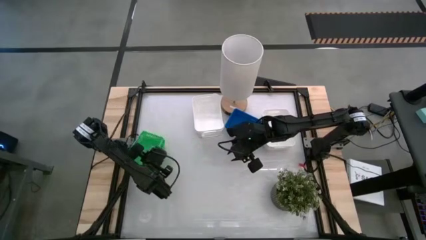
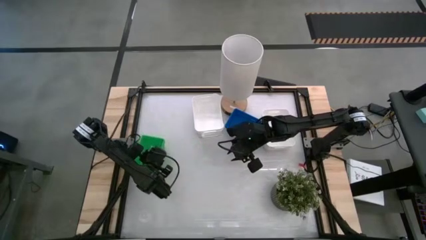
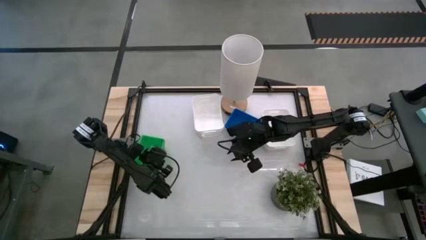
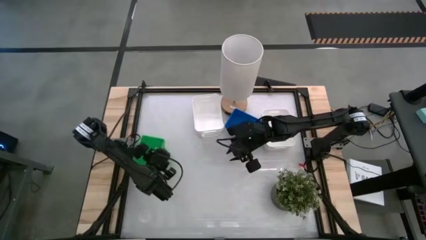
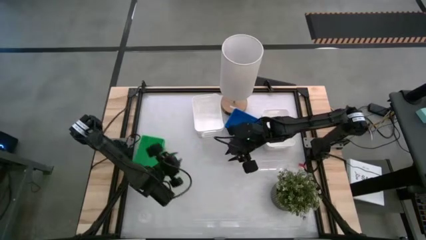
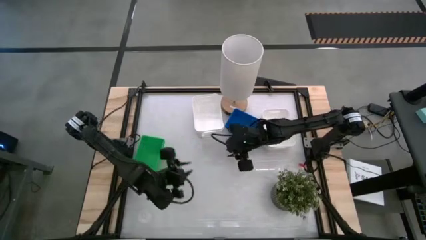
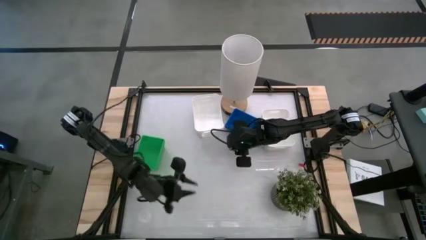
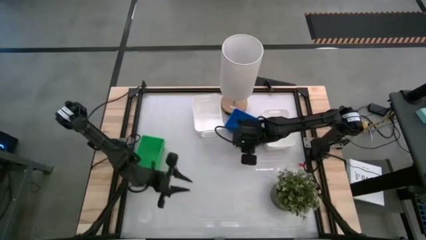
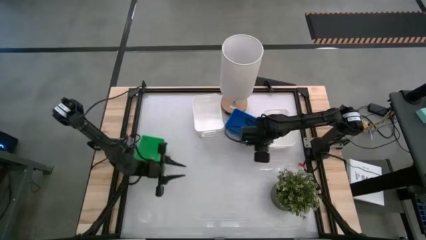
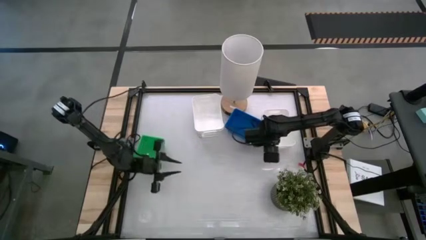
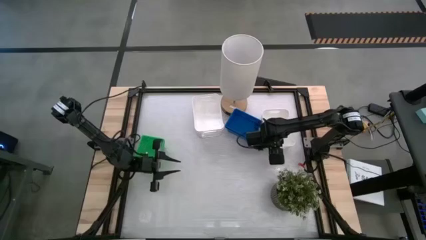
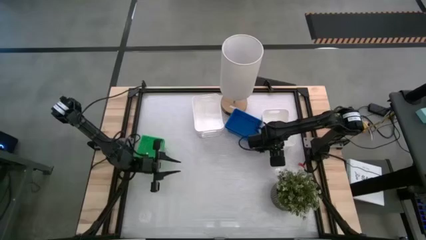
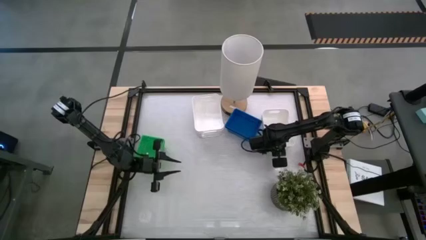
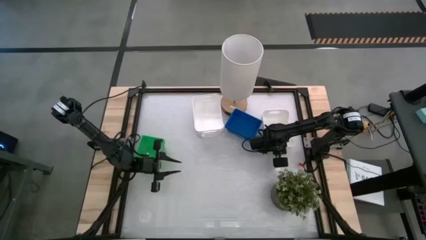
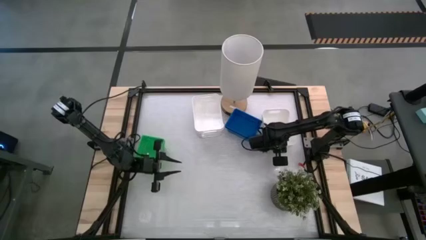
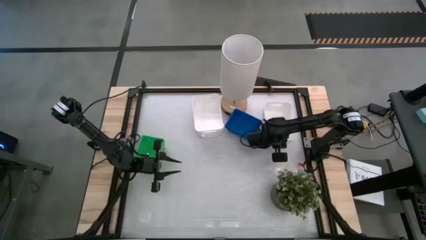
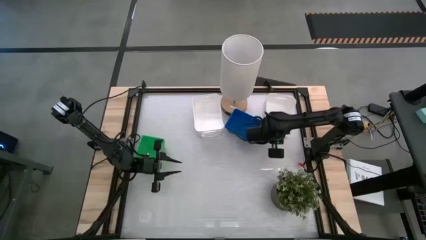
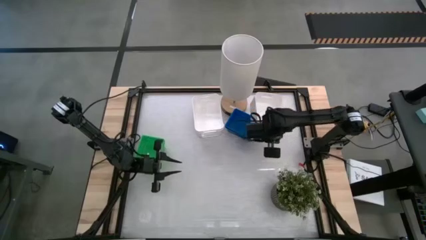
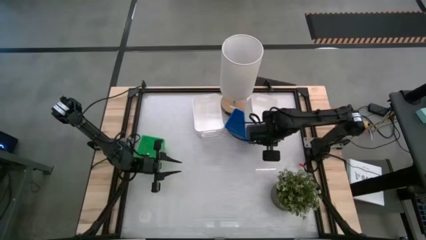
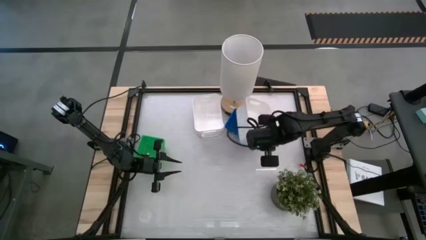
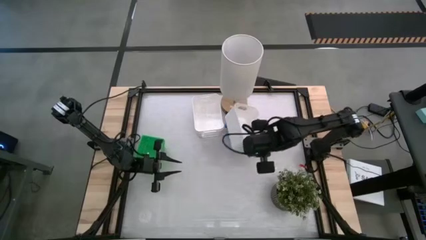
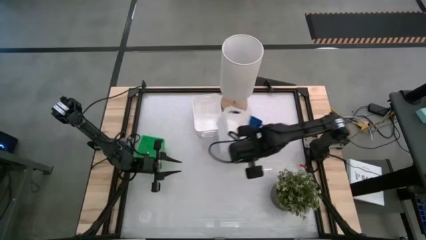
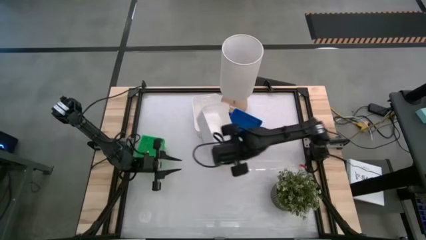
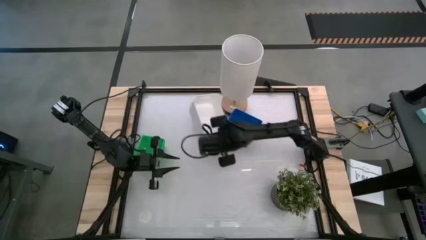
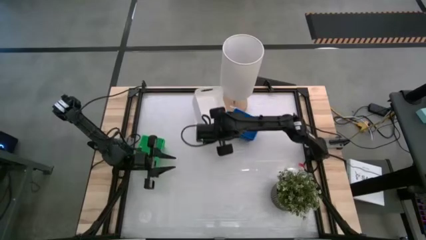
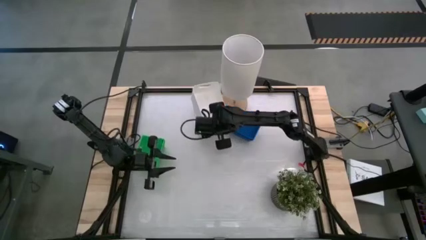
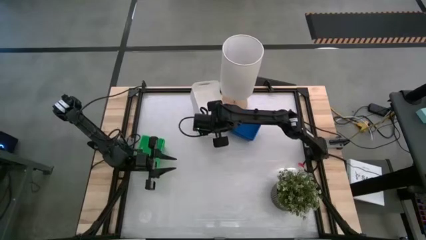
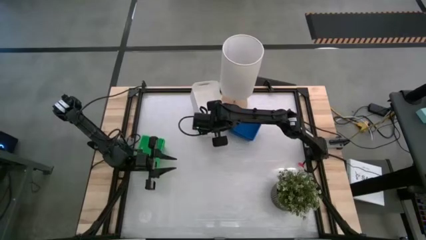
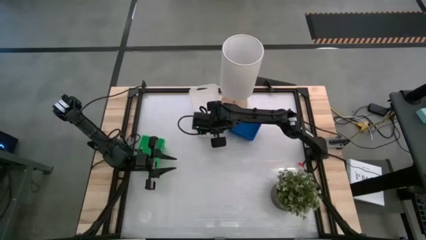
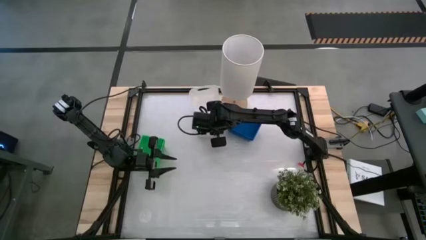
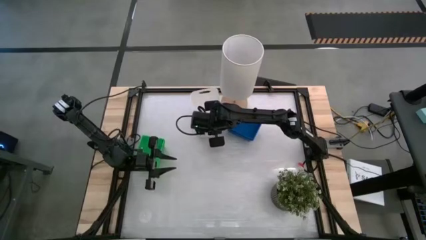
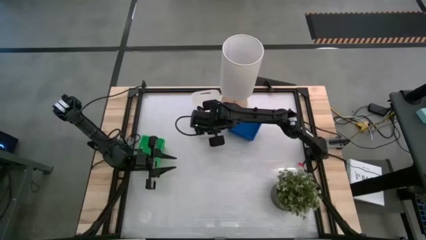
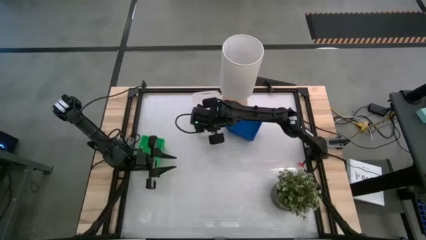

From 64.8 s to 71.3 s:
Stack the right white bin on top of the left white bin on the table

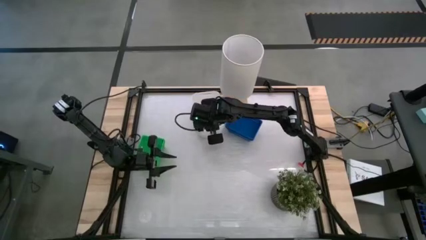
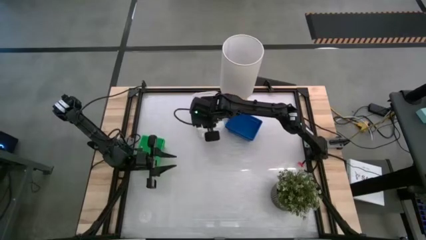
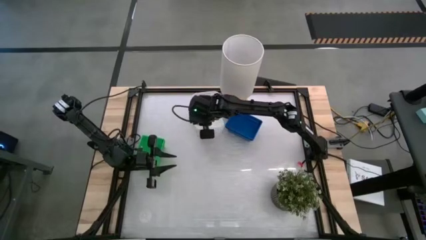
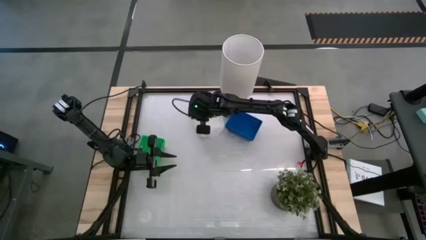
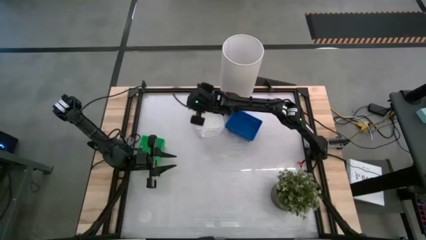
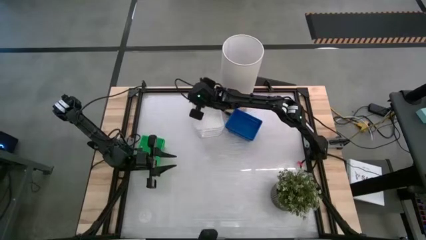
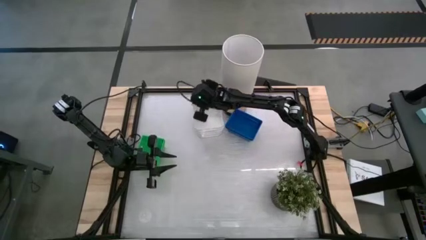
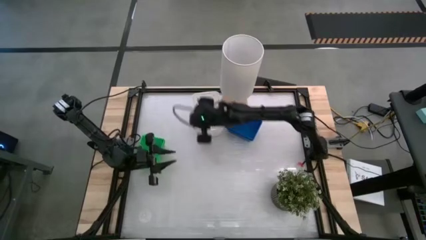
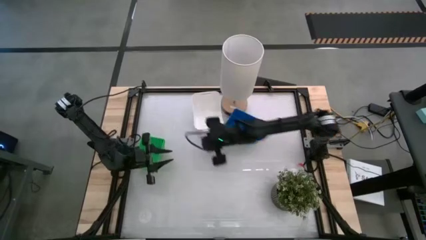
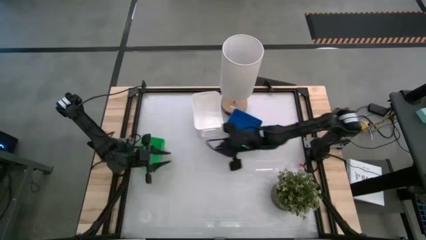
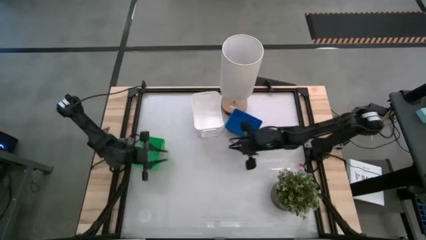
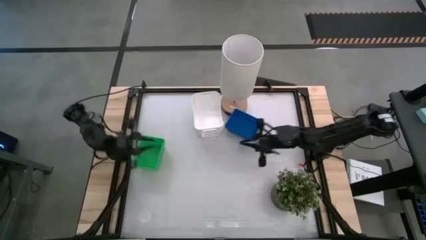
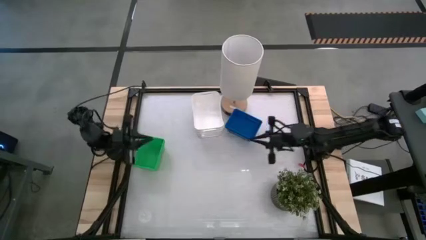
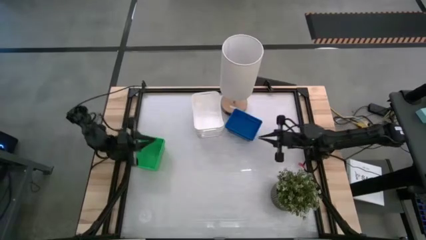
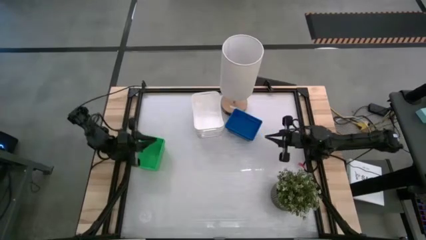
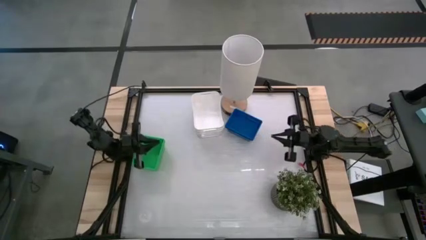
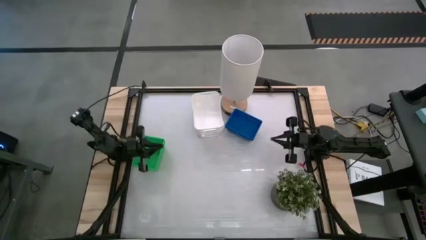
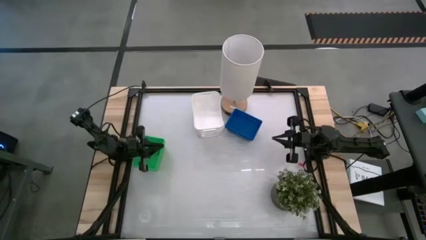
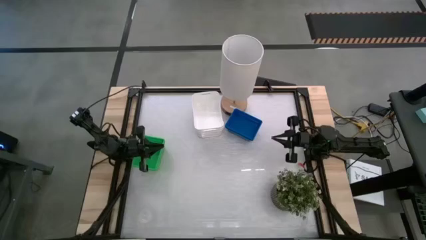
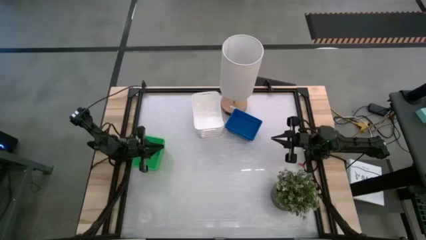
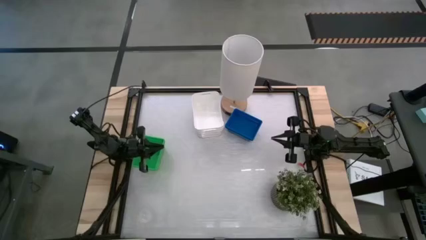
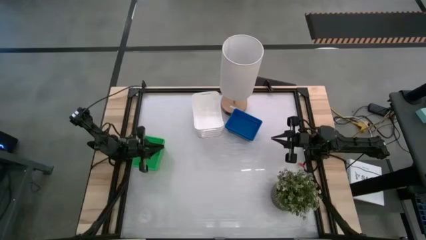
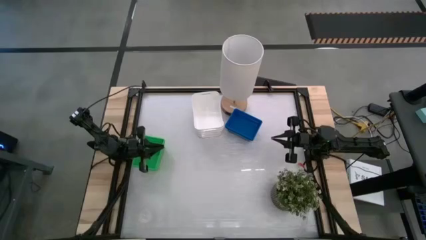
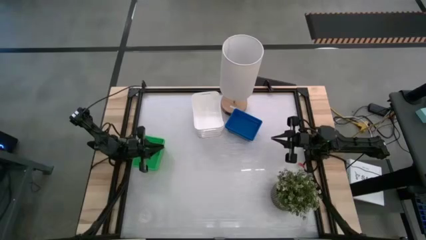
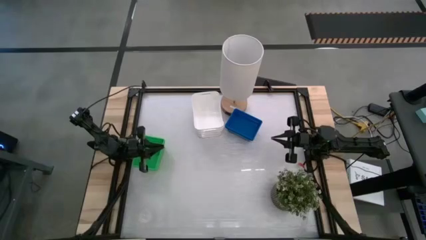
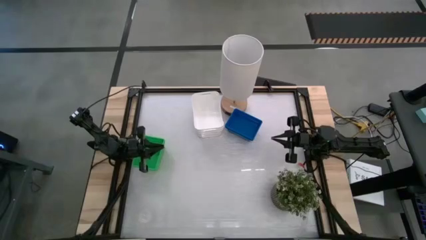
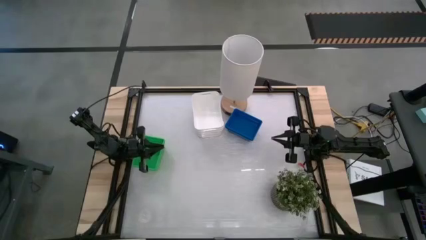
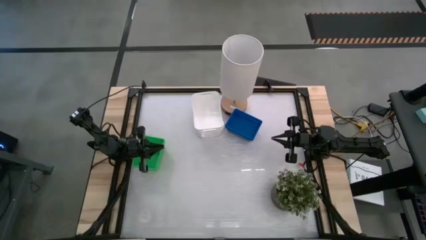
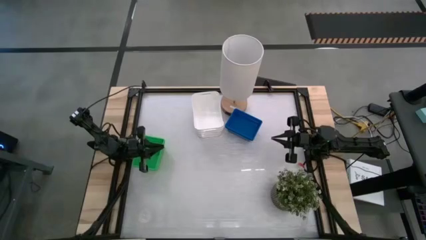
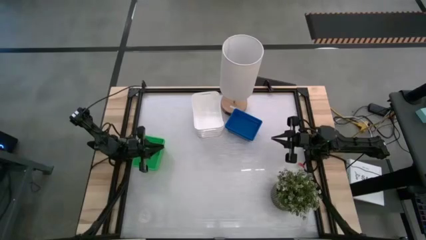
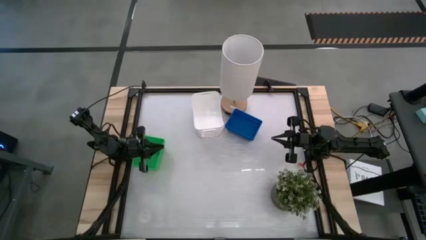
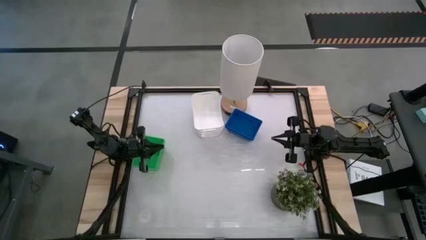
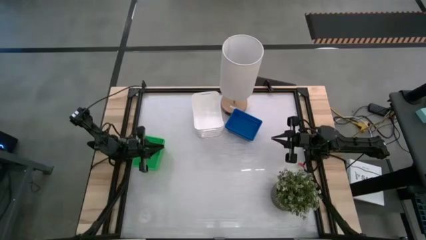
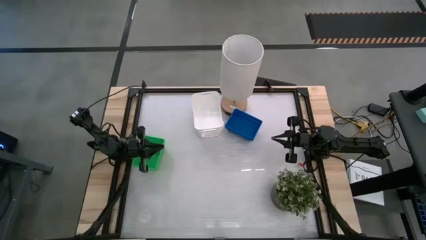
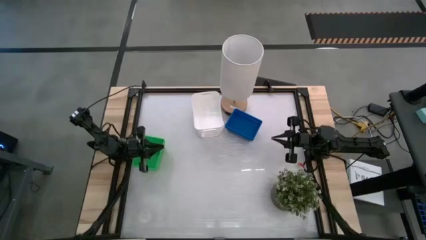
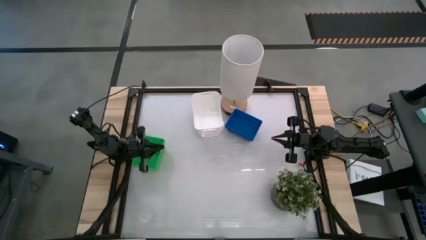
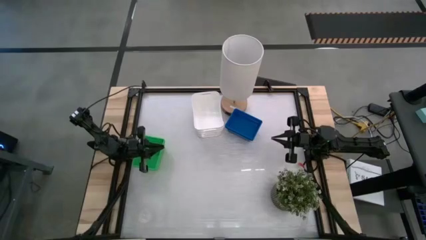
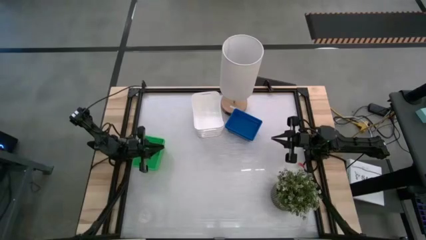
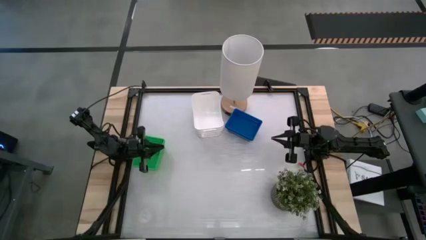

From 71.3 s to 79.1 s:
Return to Home Position
